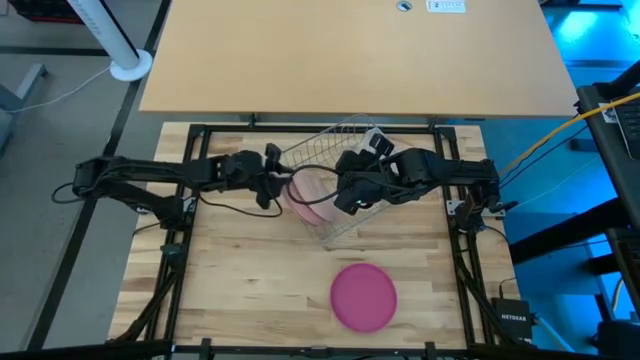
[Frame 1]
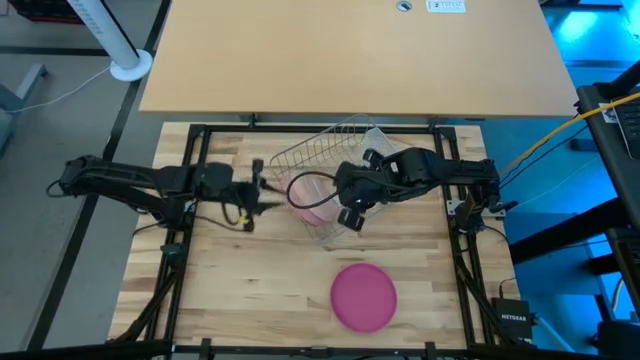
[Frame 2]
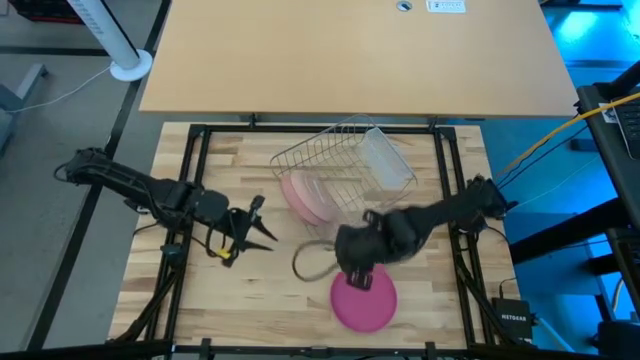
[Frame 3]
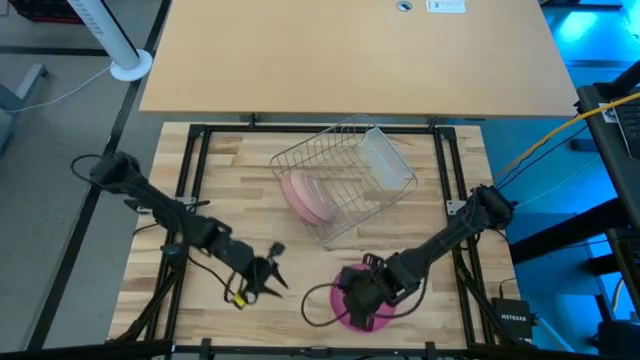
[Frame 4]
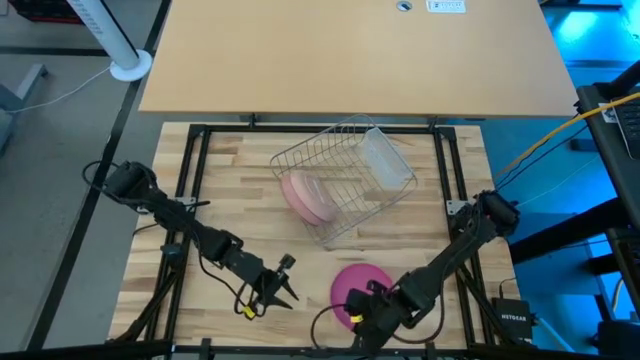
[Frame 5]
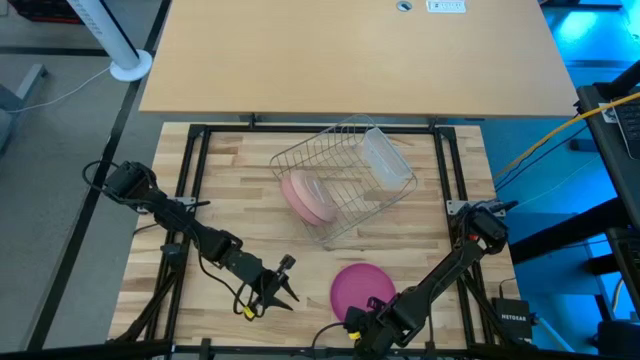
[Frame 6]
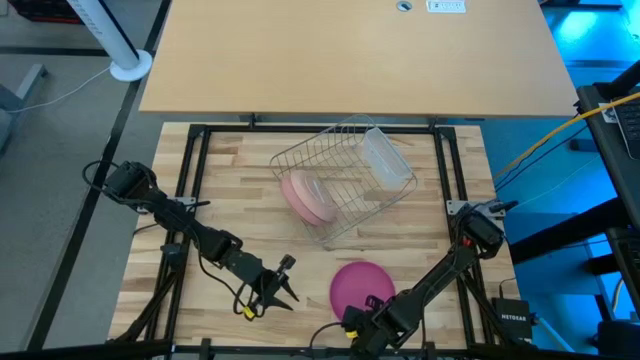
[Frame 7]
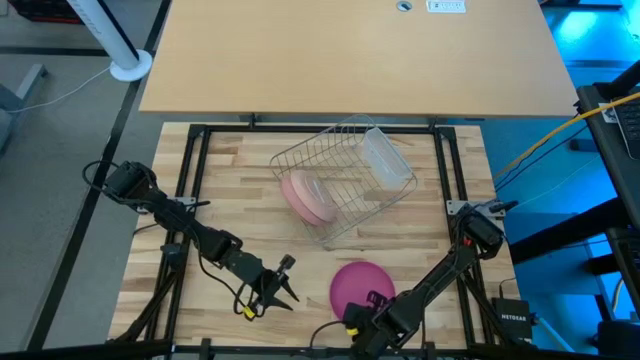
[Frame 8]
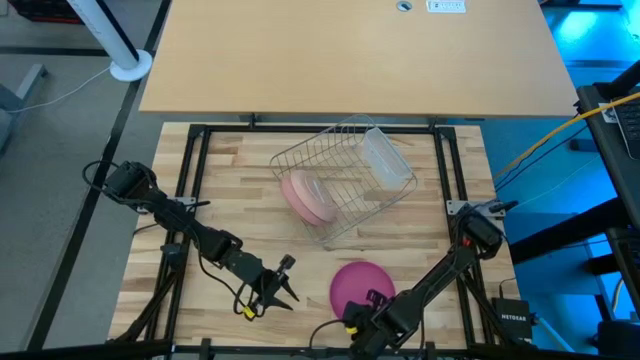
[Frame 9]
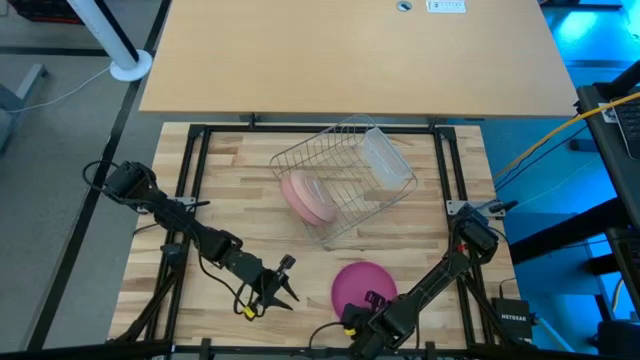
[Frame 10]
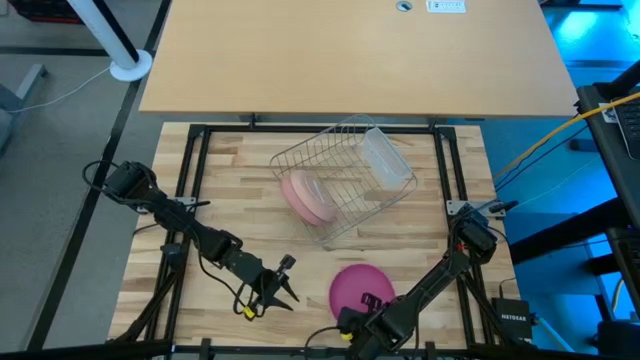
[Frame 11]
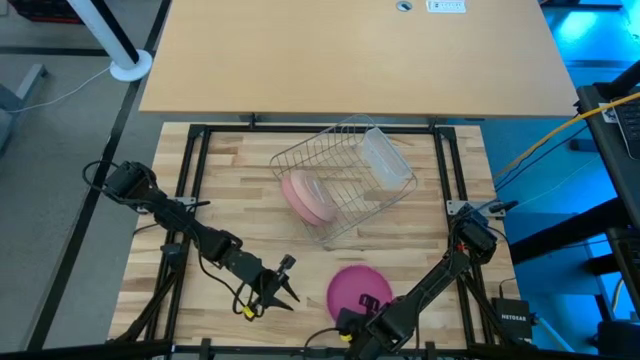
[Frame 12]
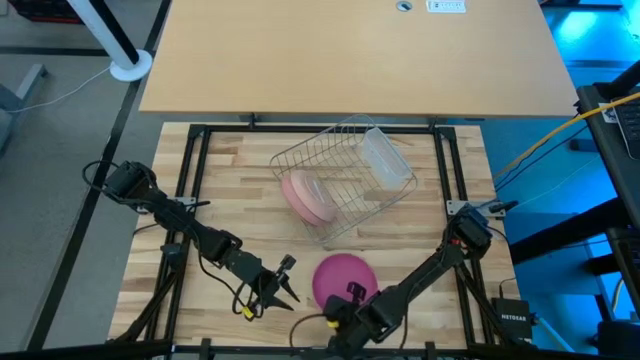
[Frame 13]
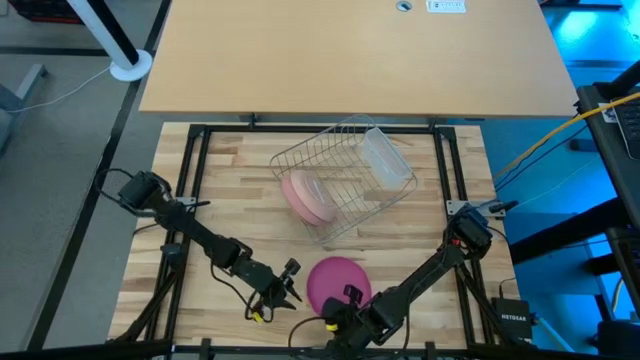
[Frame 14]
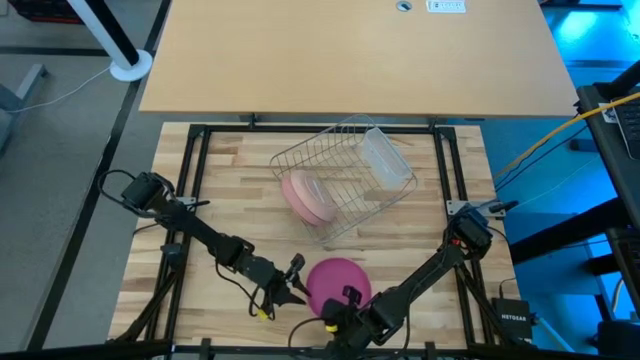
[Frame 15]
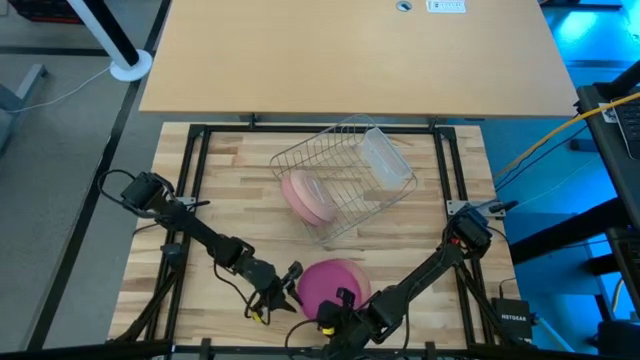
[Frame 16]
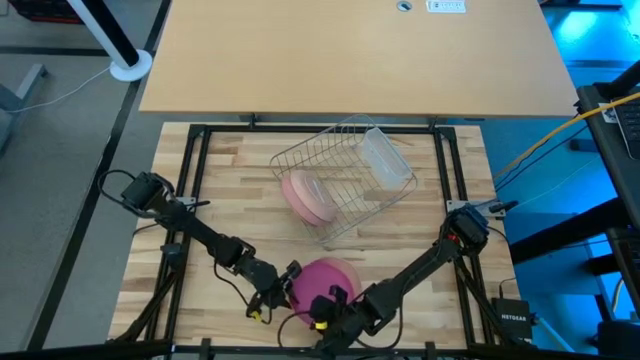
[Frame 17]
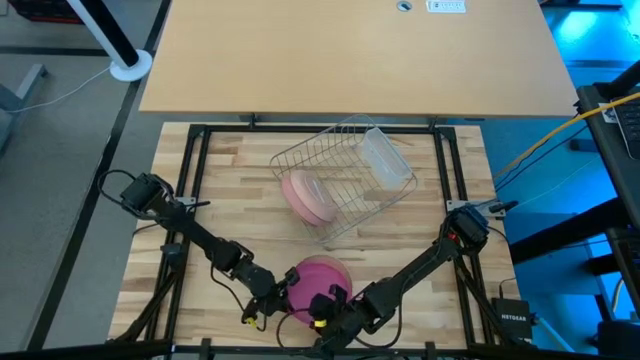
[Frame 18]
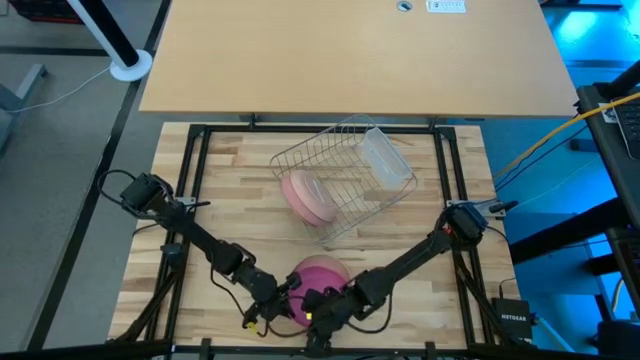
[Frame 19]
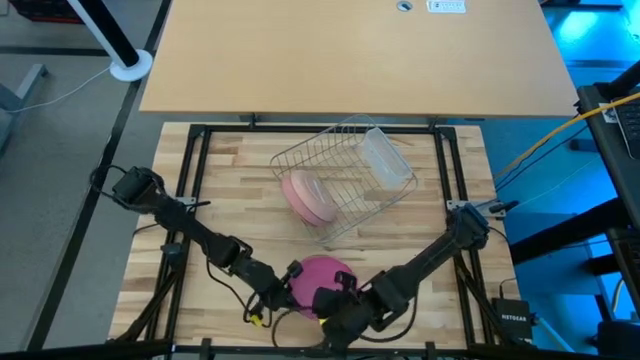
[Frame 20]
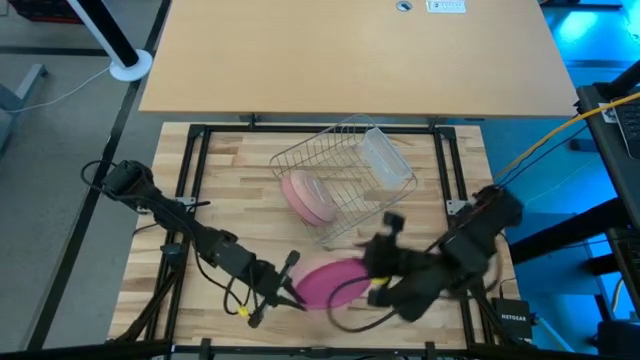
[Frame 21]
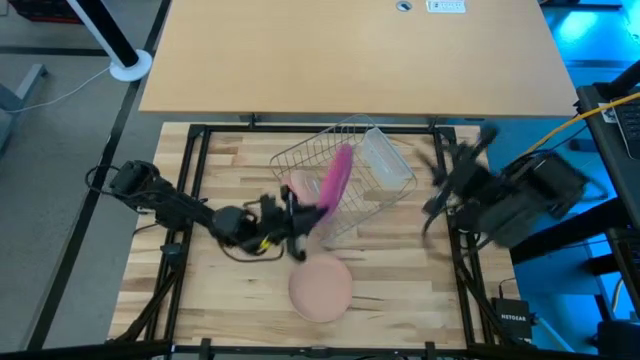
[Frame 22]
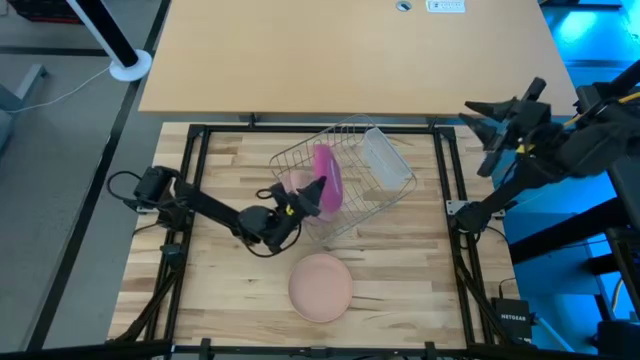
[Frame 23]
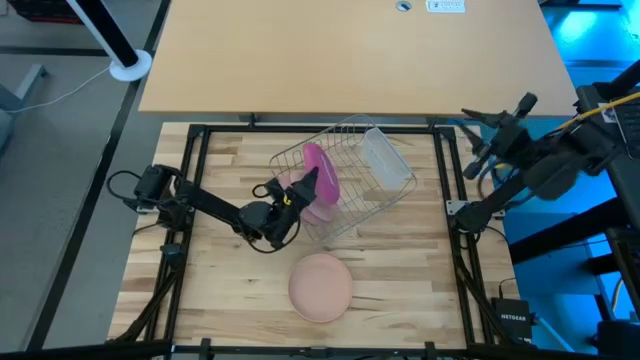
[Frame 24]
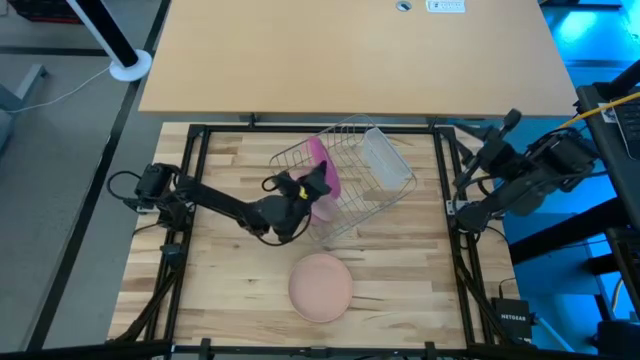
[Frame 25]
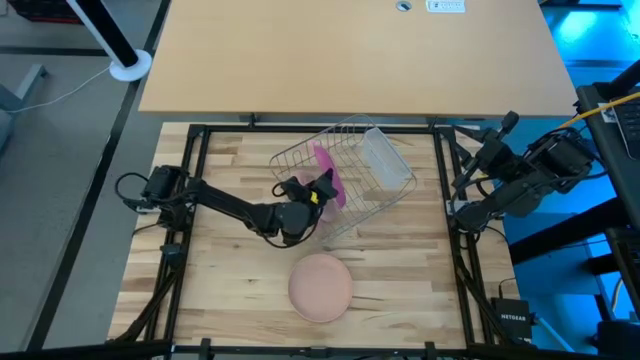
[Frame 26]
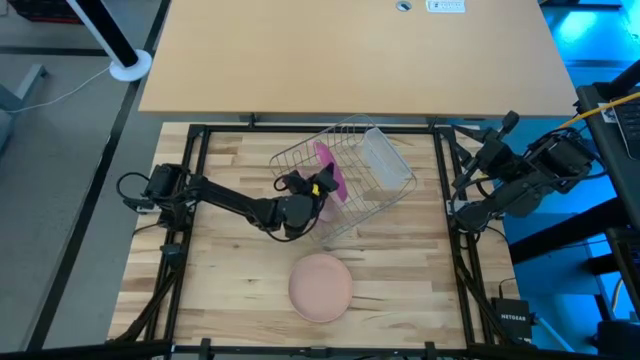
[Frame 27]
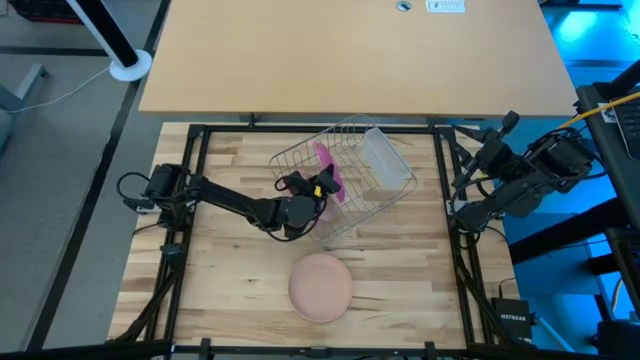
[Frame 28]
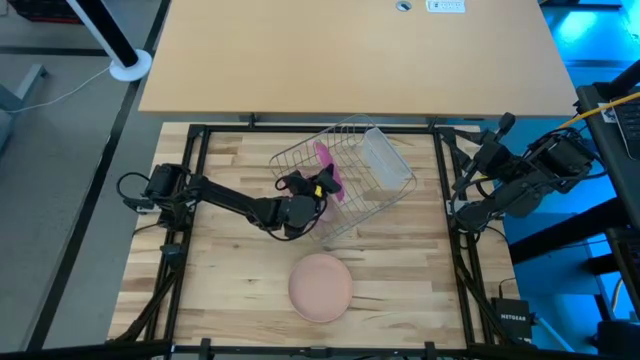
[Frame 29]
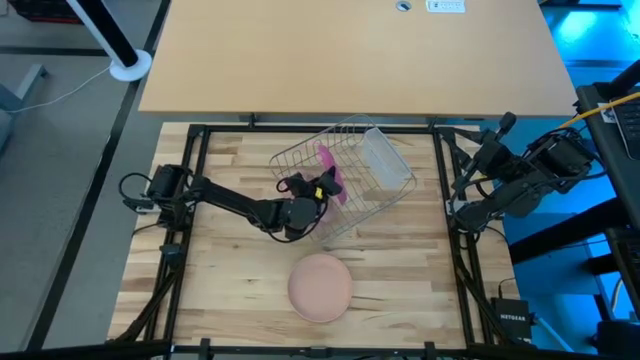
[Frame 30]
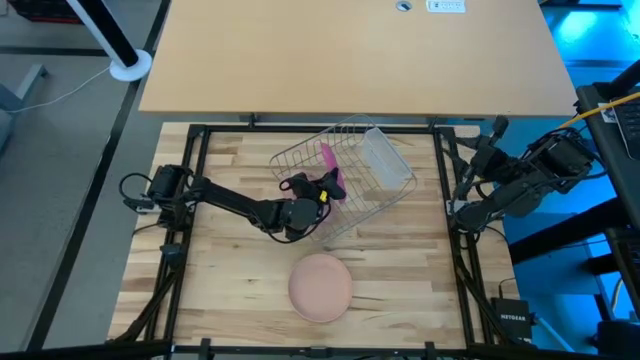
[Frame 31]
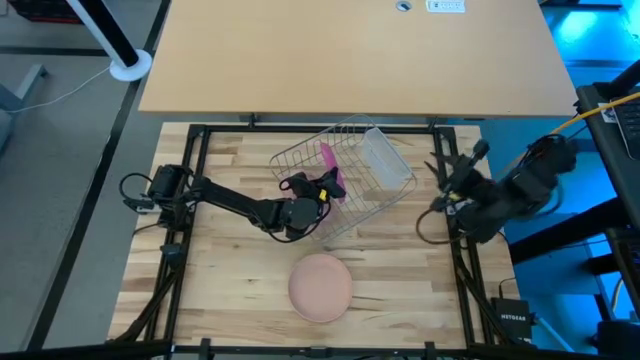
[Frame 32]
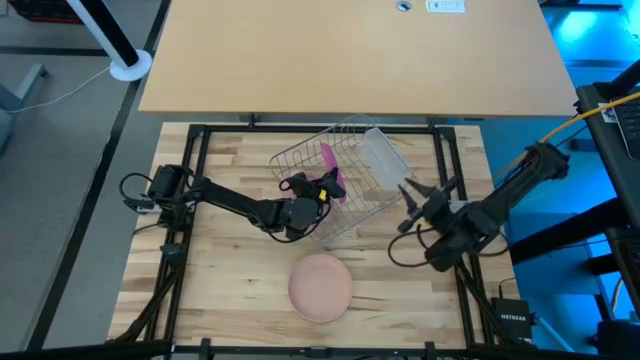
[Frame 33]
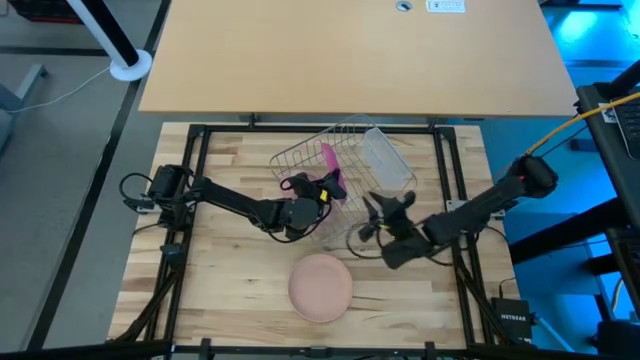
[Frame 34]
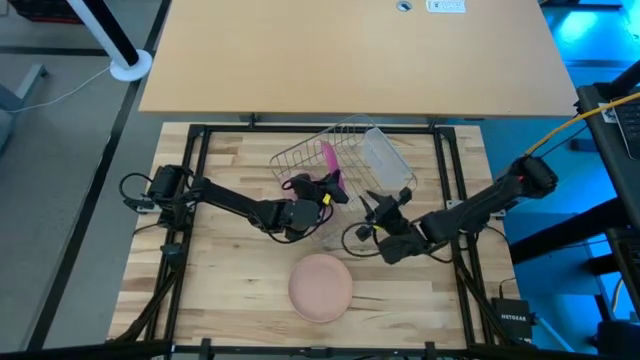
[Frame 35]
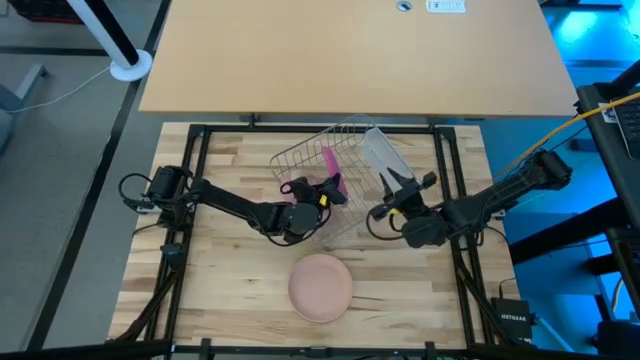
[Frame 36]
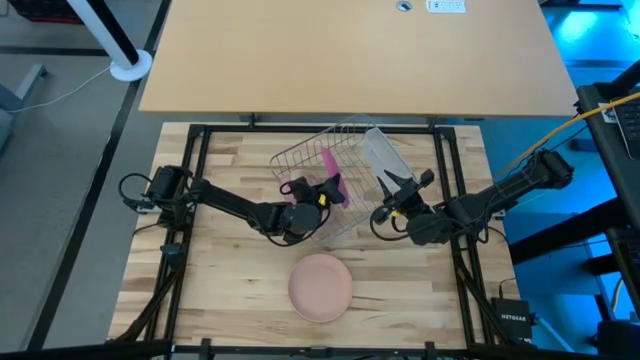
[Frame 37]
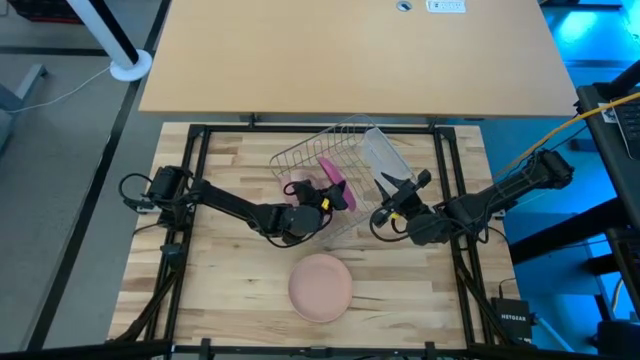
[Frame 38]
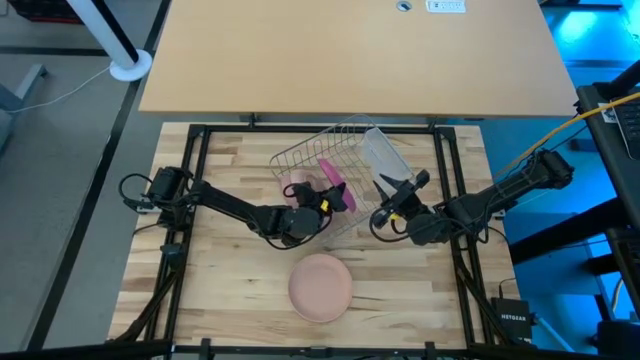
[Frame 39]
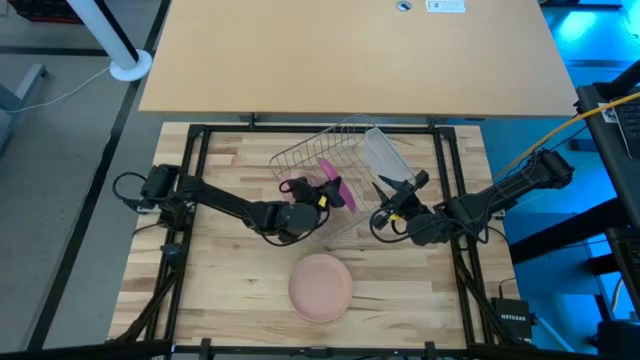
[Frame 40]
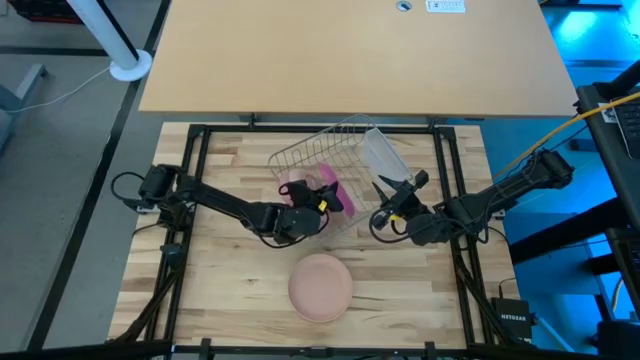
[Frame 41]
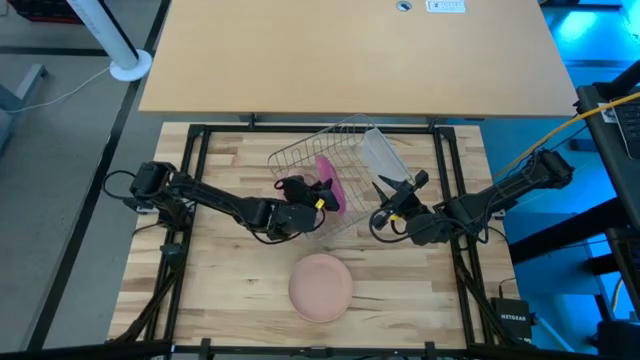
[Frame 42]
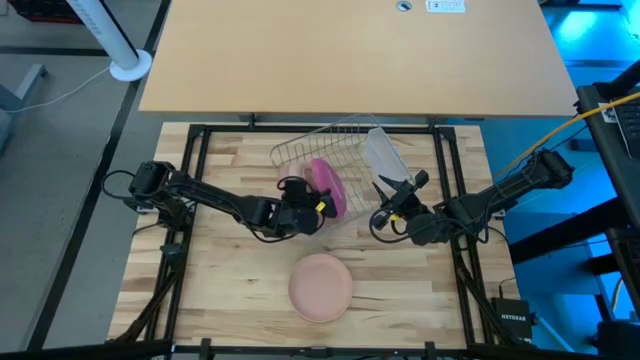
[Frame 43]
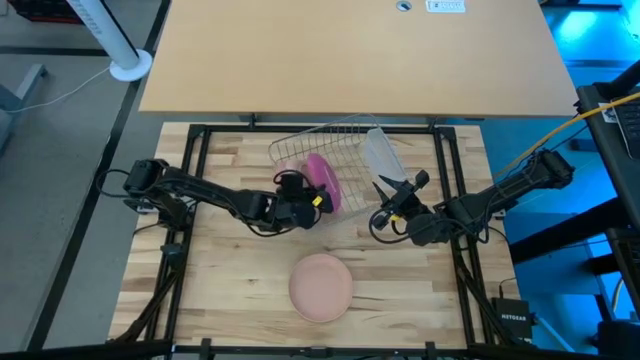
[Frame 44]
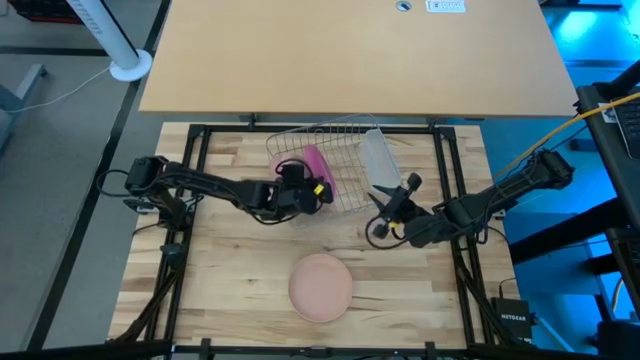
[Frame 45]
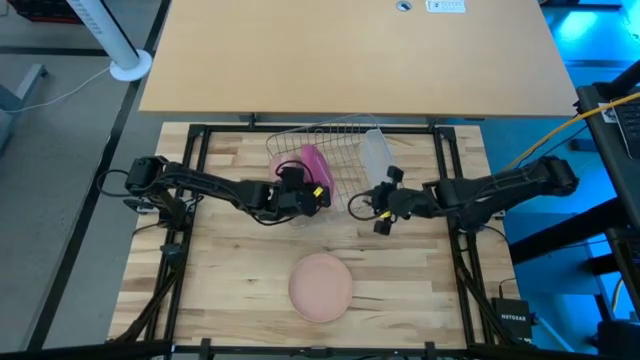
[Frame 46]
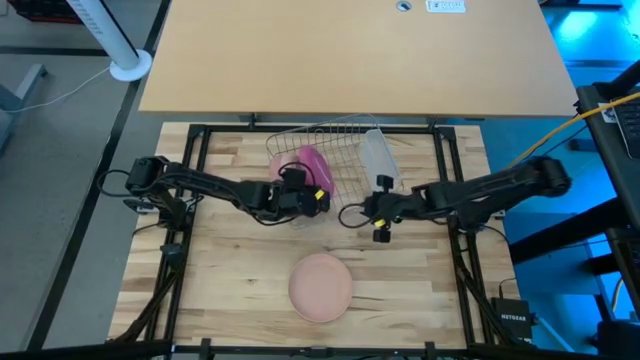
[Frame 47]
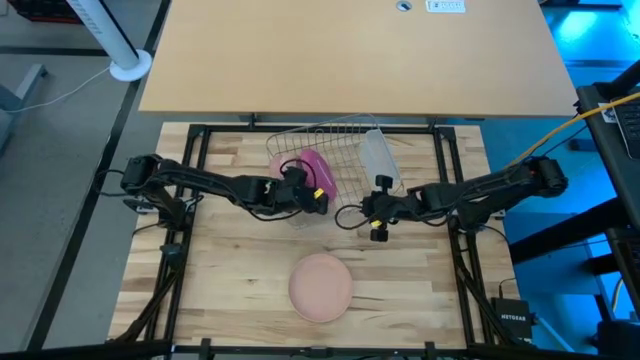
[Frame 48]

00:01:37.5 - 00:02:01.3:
Task: Sort dishes
Put the pink plate into the dish rack
